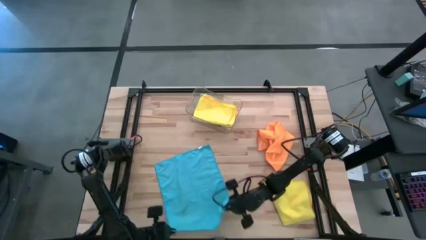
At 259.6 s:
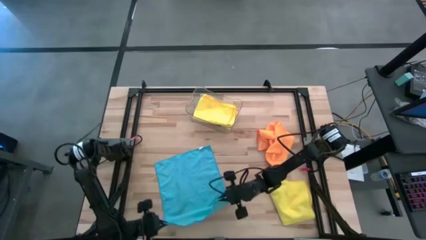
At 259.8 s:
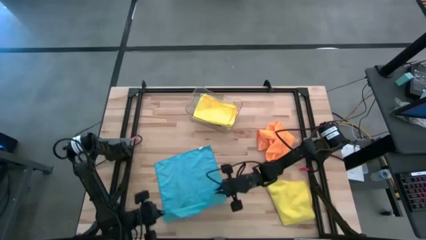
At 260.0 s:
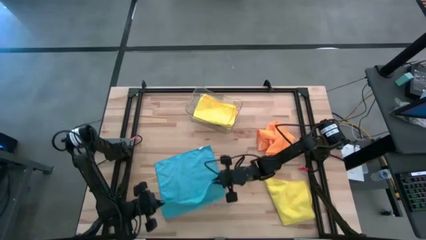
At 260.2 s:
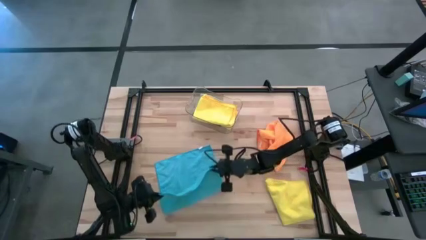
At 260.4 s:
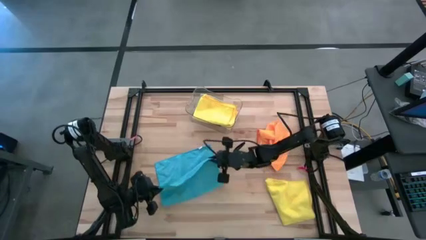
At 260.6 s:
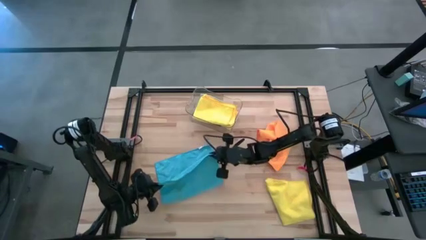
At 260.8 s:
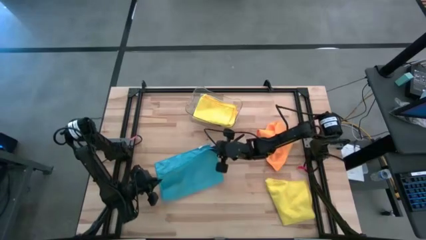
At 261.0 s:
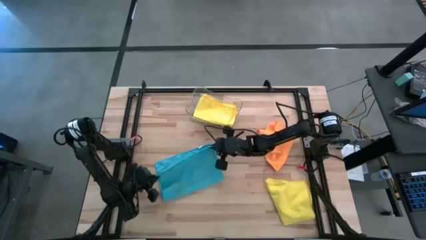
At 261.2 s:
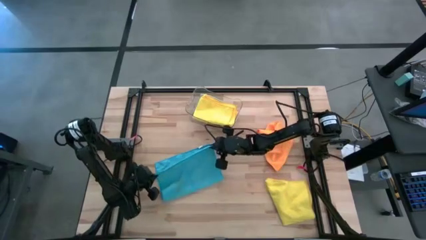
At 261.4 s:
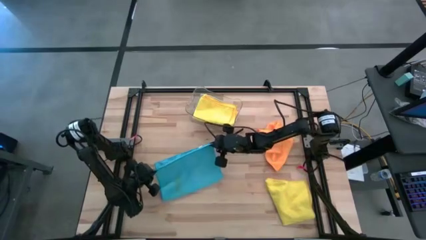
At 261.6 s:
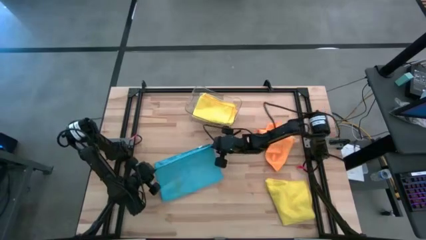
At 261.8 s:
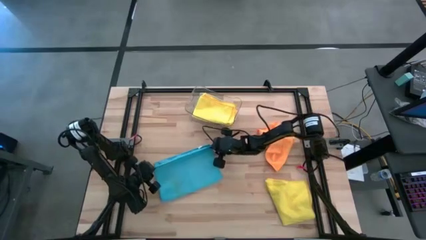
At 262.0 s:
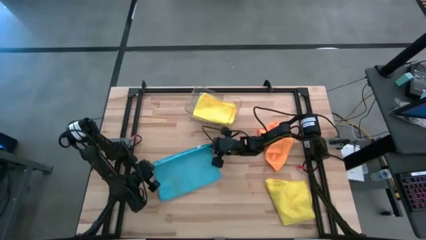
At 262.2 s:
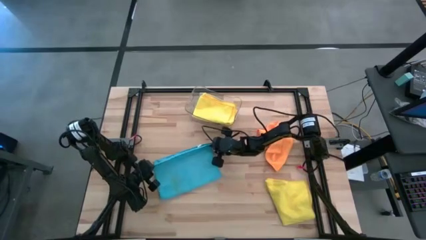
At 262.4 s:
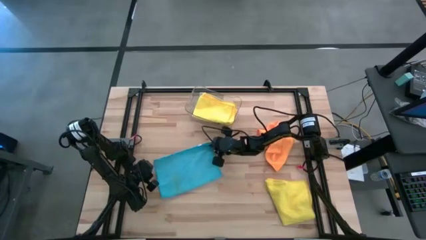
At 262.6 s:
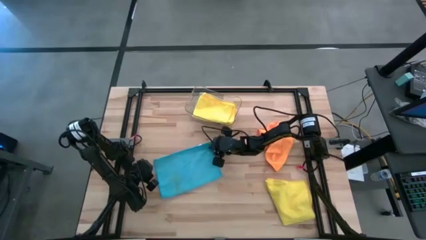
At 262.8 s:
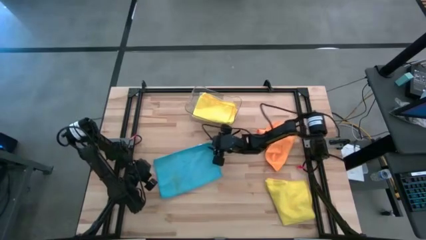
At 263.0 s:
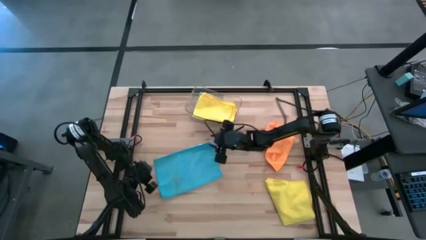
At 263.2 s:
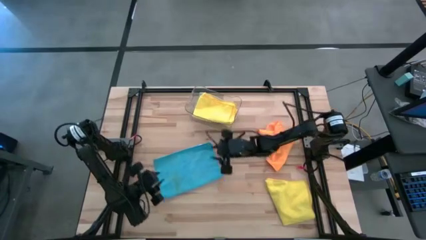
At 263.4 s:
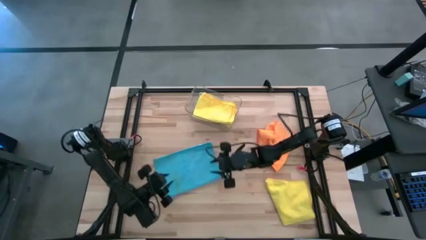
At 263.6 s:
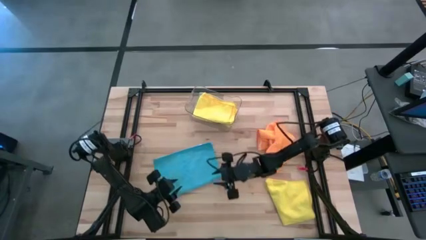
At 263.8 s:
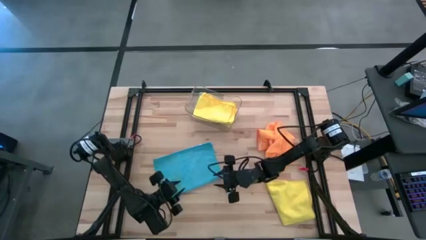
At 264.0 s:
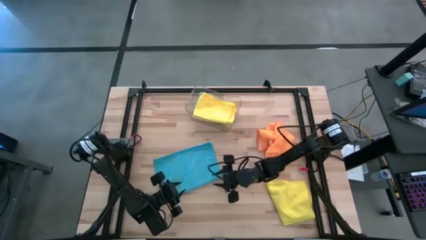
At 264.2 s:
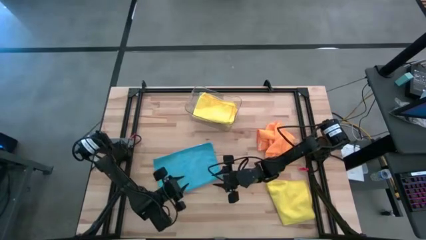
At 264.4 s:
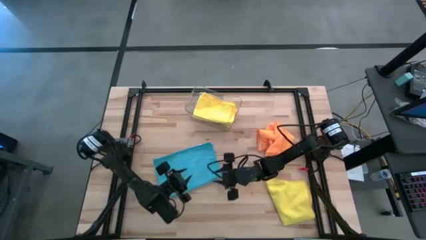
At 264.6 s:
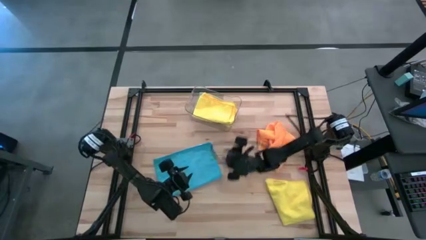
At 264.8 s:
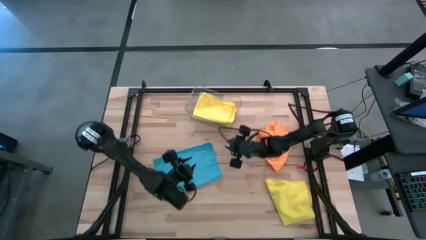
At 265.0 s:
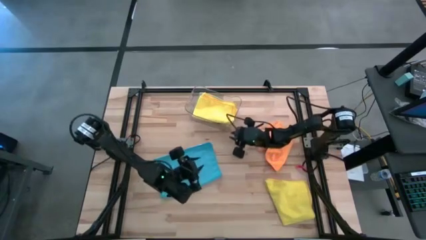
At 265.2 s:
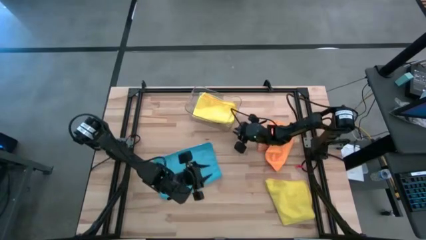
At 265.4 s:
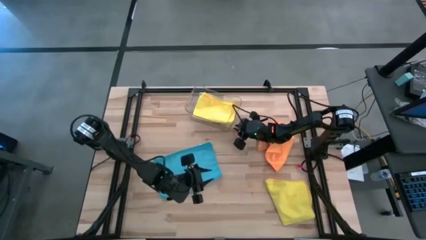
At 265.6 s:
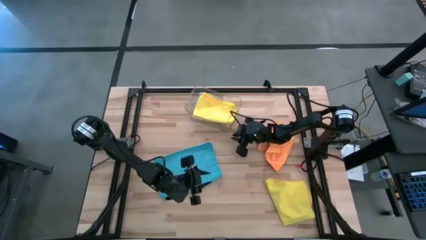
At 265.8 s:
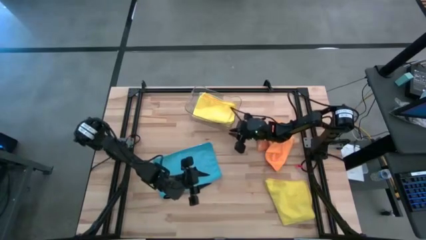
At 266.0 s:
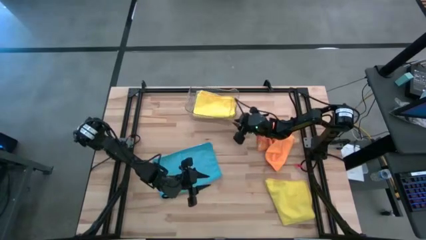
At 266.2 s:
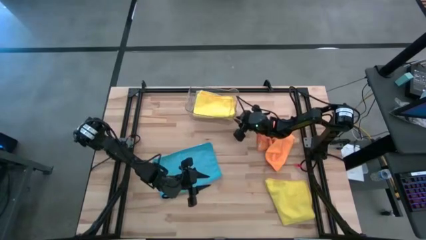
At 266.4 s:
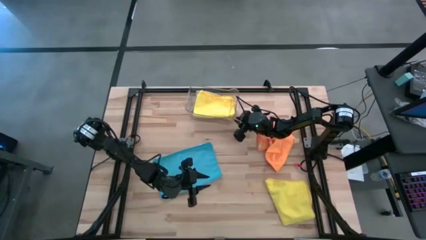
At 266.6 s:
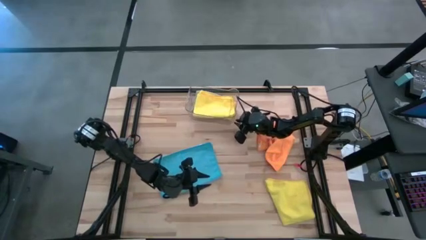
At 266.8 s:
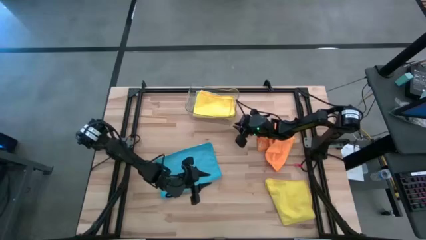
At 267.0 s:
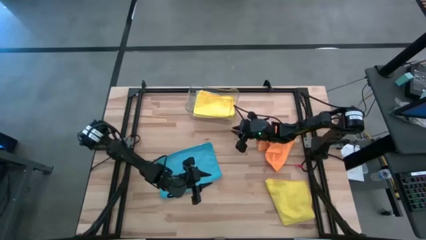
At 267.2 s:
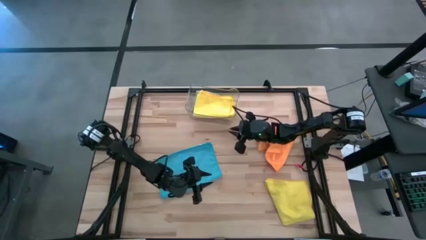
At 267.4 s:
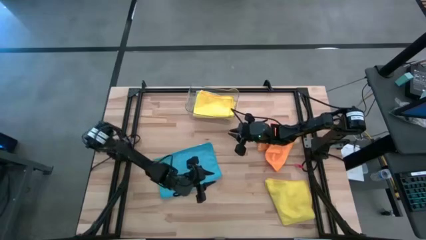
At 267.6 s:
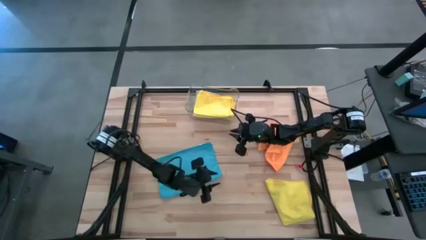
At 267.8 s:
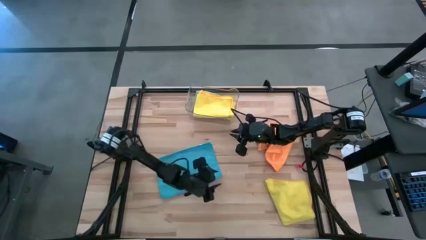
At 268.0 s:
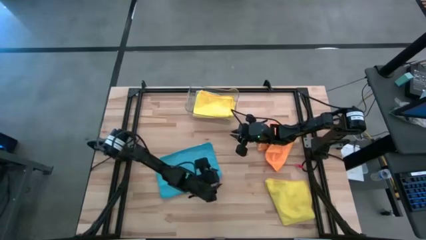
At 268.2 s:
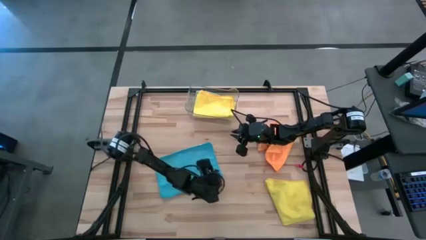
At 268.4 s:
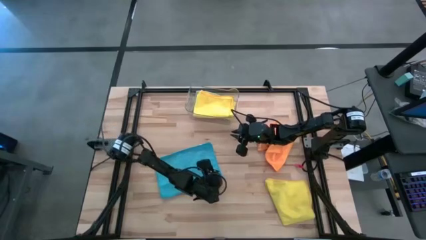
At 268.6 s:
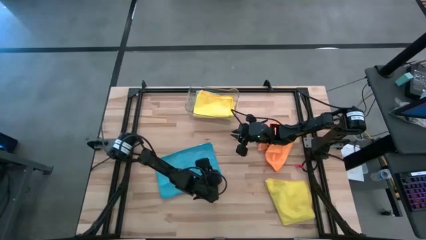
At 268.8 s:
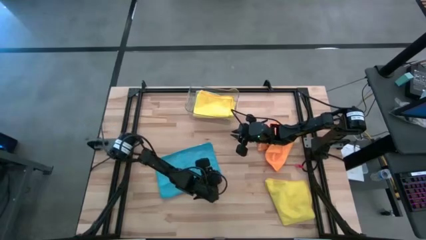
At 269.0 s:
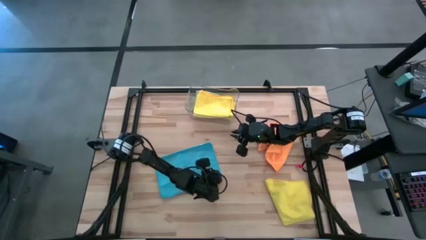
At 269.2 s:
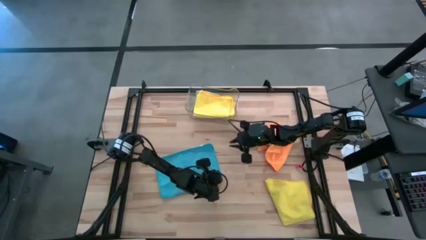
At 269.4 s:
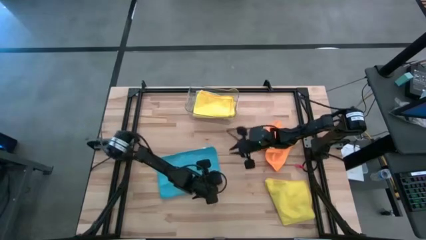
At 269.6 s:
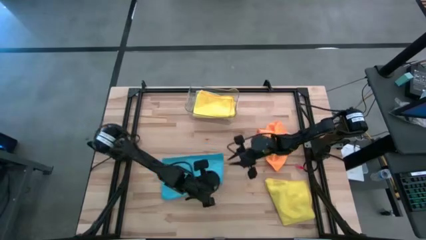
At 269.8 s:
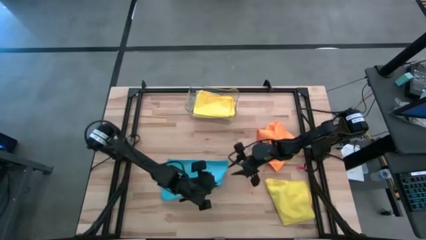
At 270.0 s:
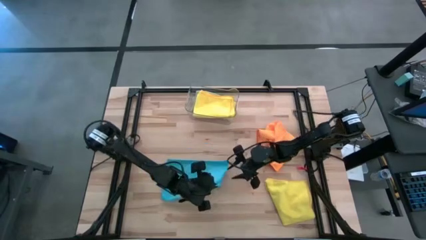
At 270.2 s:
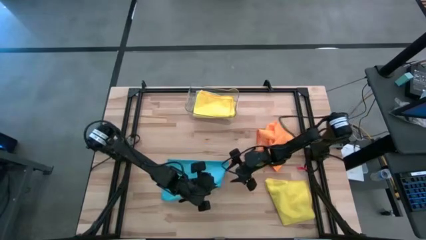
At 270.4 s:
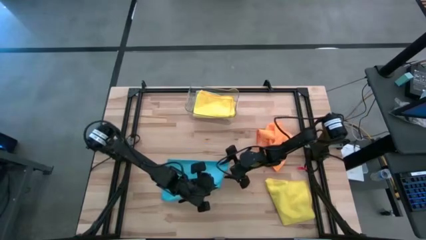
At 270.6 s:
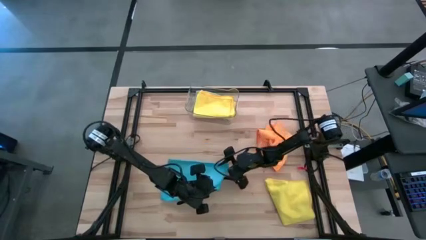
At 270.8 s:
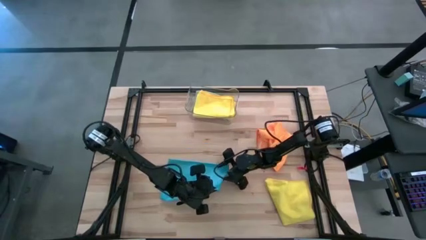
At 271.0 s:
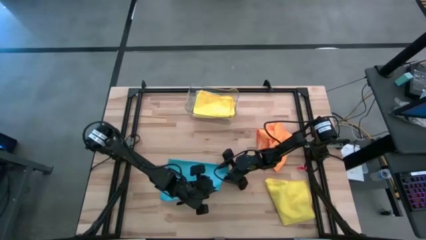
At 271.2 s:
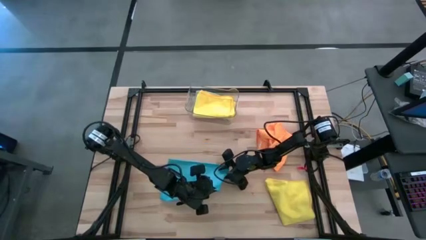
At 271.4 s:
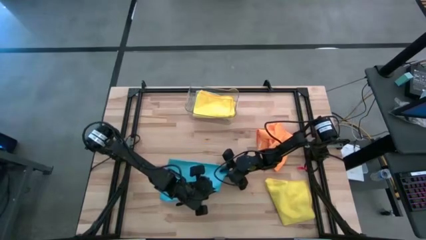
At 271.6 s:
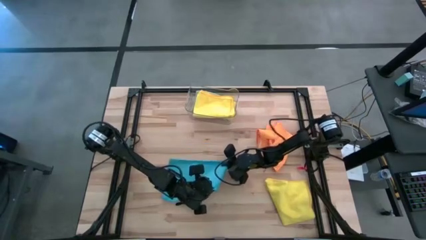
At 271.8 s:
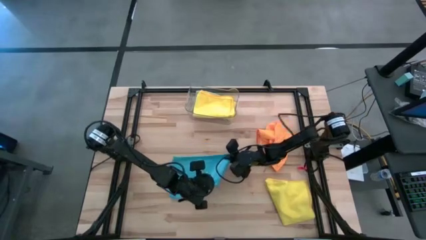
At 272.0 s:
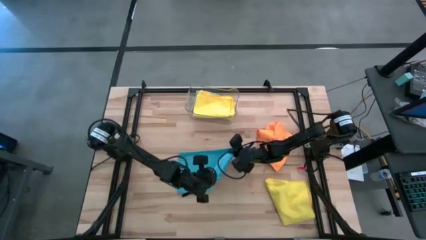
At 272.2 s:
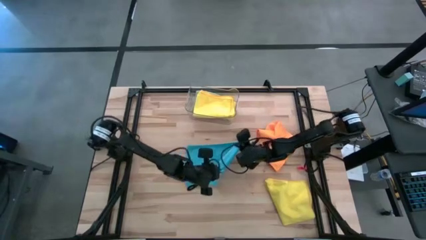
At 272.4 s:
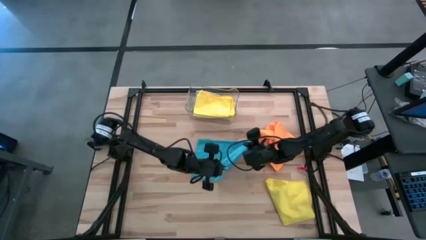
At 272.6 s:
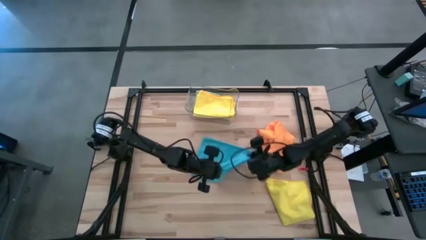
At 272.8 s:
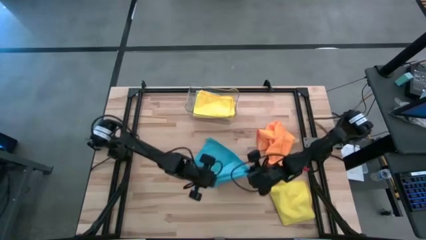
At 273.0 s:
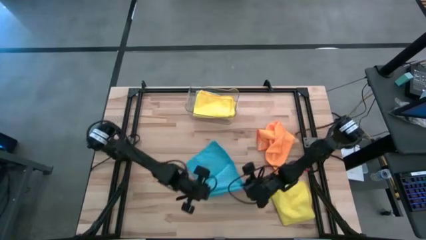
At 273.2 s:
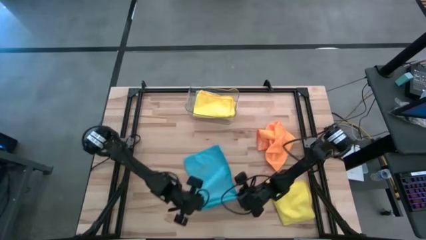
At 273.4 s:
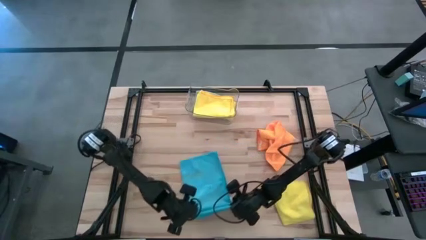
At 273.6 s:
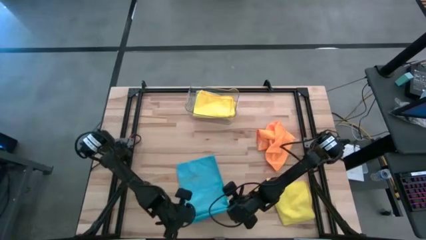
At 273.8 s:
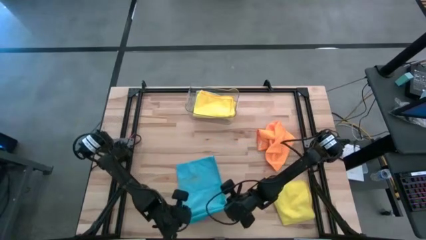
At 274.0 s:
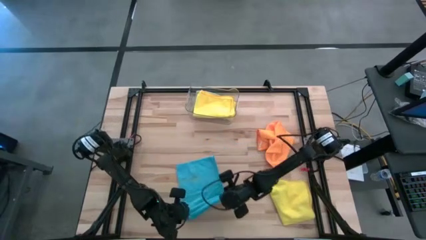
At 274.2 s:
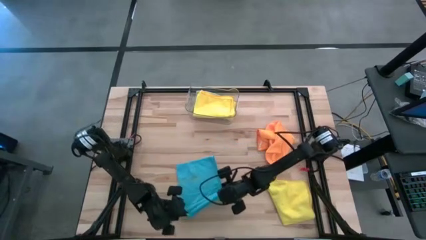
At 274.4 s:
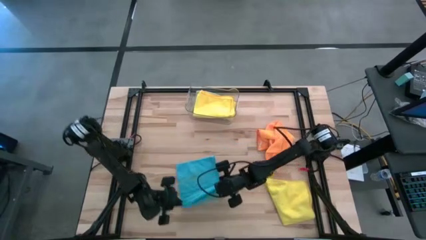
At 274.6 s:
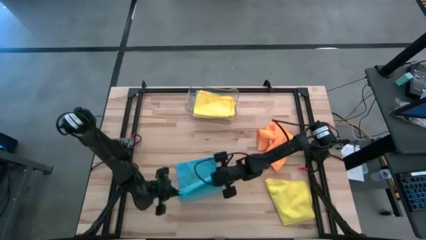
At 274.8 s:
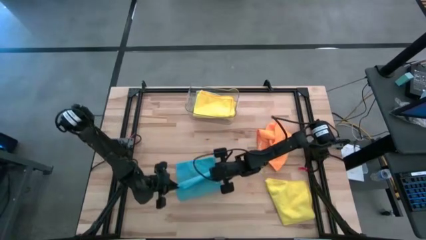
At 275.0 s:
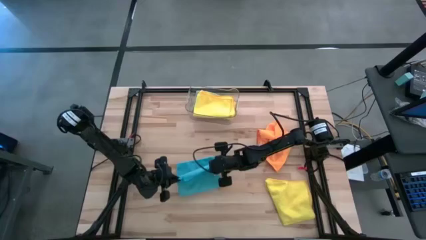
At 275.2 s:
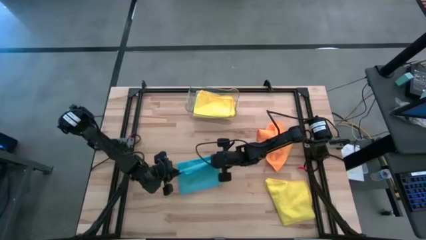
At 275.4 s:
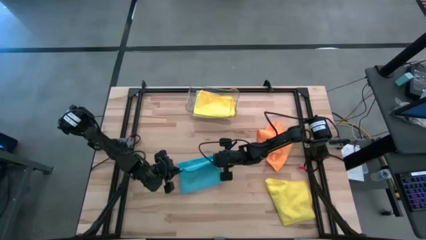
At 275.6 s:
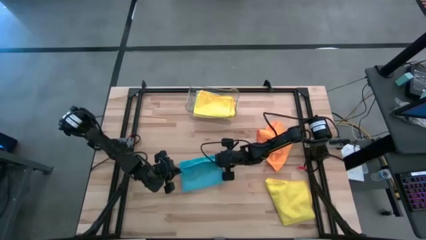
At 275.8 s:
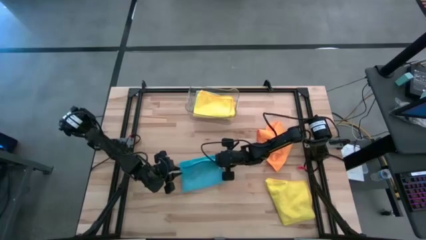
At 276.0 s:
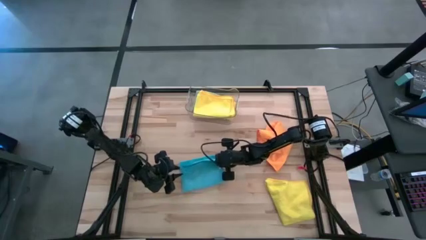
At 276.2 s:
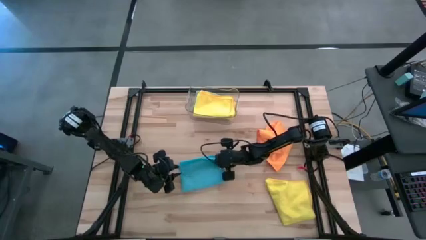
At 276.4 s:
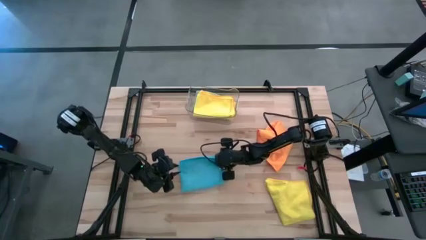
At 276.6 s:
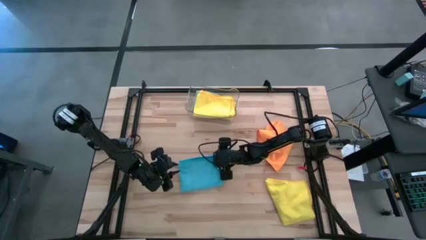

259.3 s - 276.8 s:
Task: Fold microfiber towels
Fold the blue microfiber cloth
